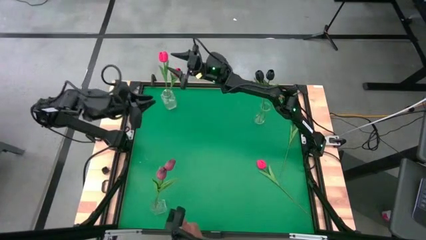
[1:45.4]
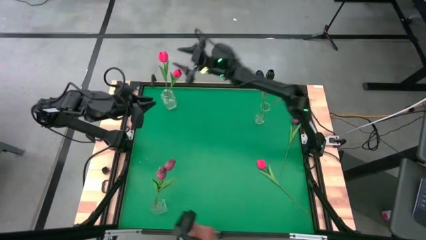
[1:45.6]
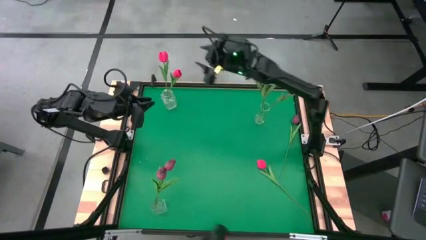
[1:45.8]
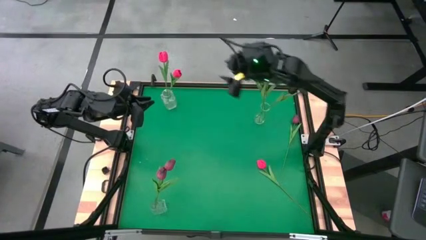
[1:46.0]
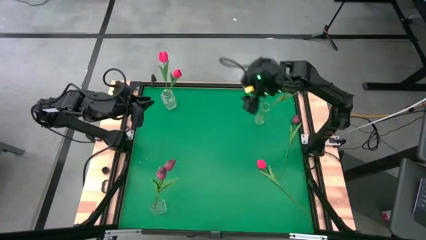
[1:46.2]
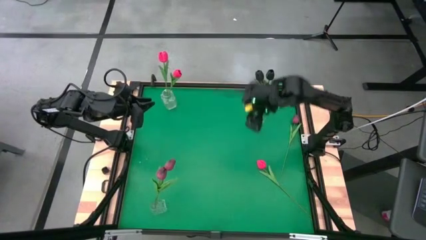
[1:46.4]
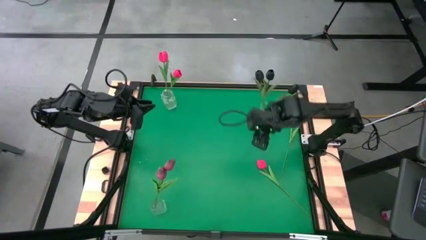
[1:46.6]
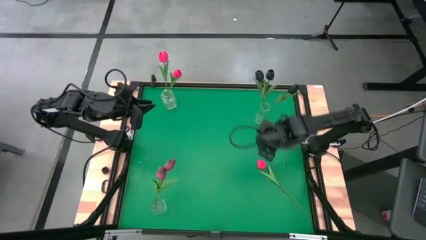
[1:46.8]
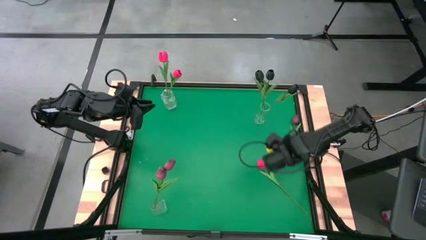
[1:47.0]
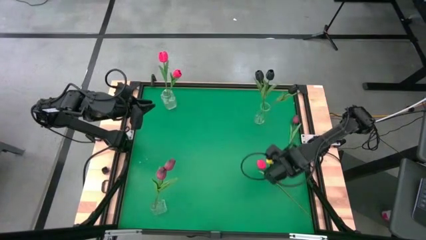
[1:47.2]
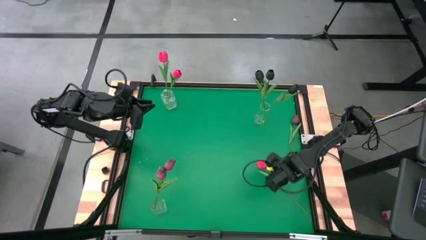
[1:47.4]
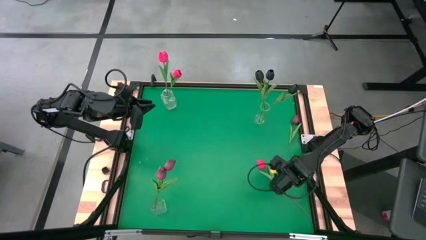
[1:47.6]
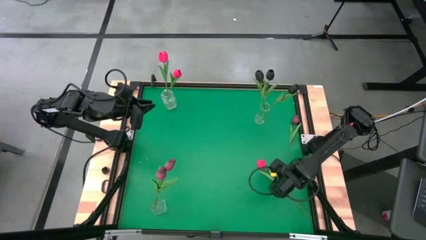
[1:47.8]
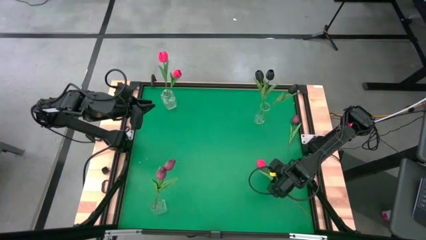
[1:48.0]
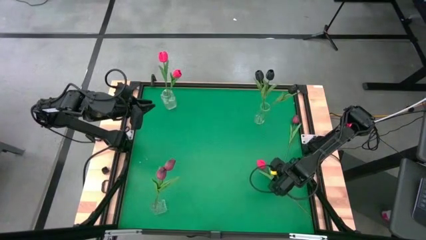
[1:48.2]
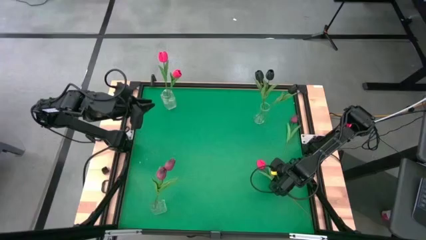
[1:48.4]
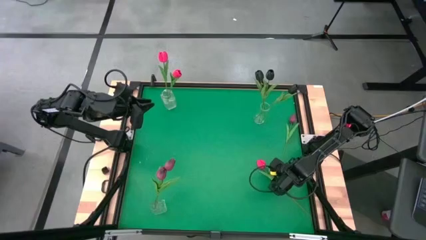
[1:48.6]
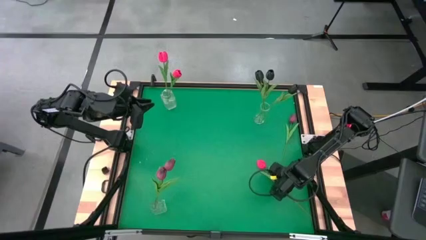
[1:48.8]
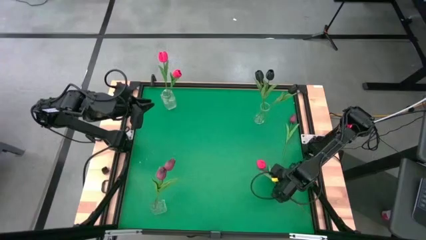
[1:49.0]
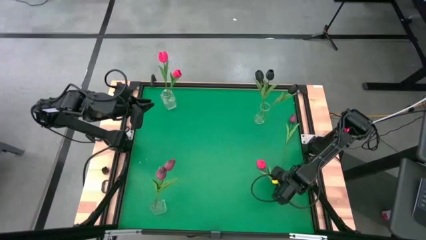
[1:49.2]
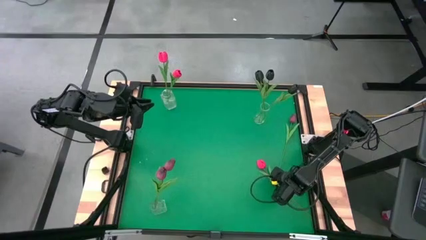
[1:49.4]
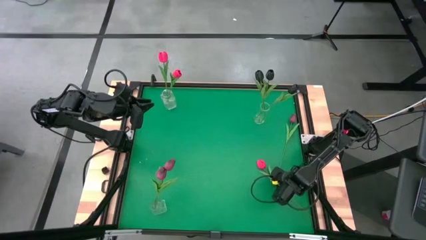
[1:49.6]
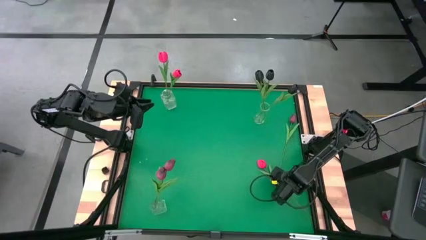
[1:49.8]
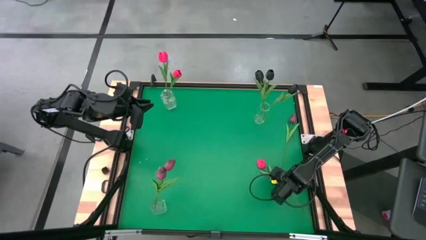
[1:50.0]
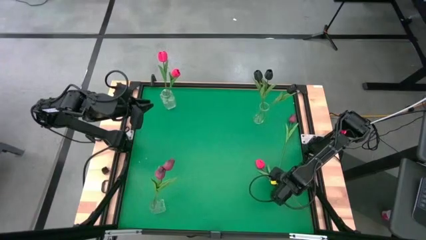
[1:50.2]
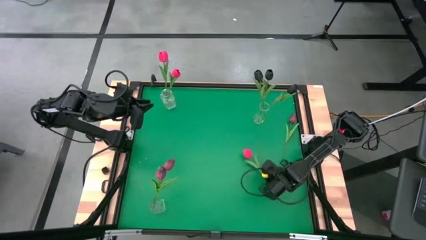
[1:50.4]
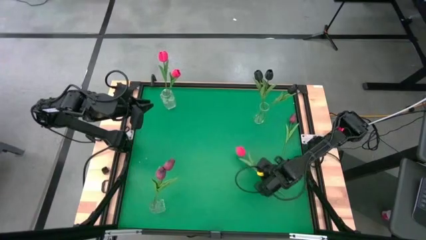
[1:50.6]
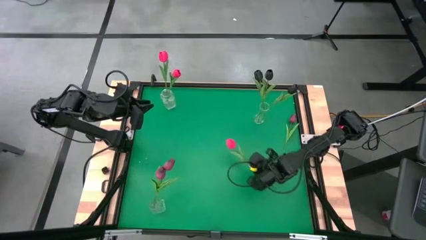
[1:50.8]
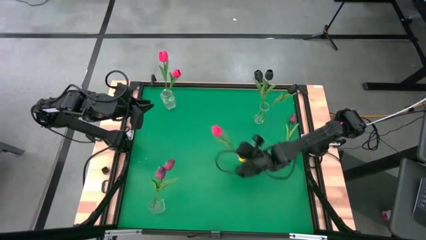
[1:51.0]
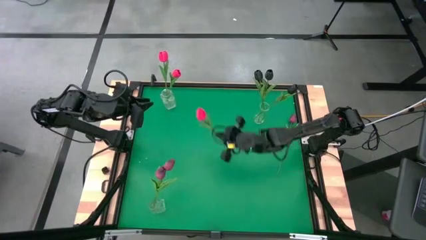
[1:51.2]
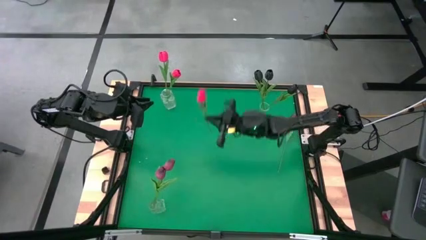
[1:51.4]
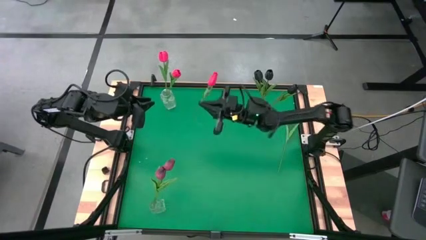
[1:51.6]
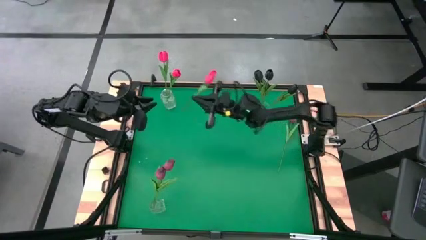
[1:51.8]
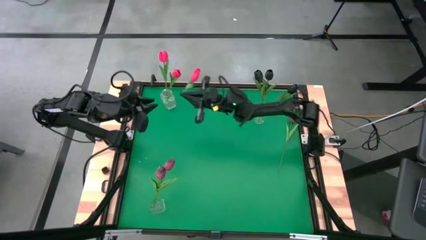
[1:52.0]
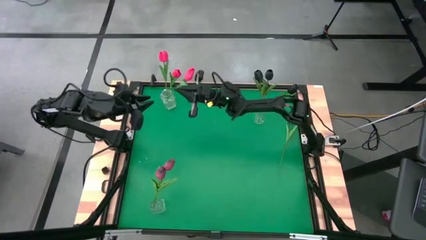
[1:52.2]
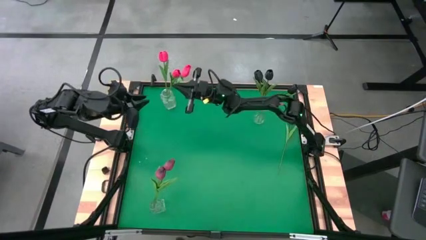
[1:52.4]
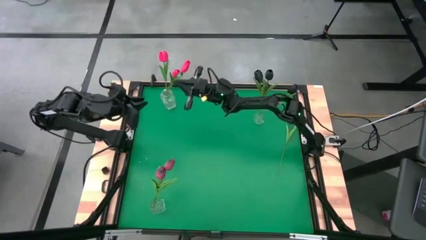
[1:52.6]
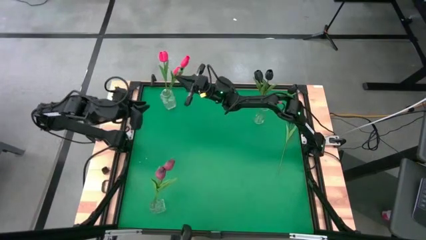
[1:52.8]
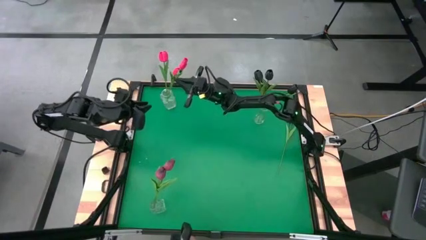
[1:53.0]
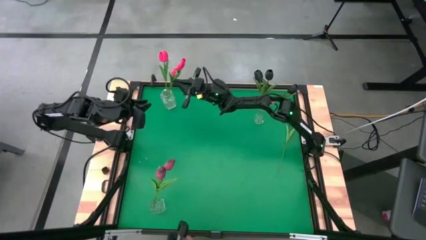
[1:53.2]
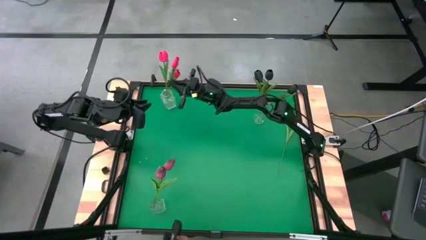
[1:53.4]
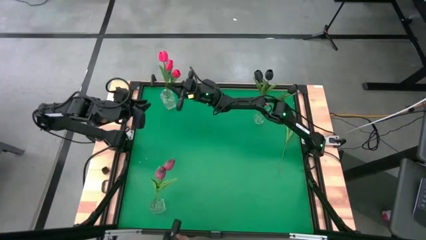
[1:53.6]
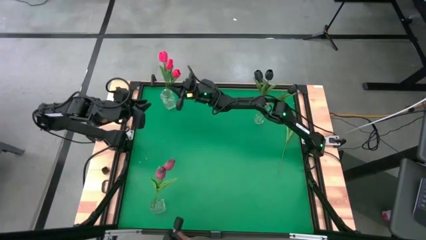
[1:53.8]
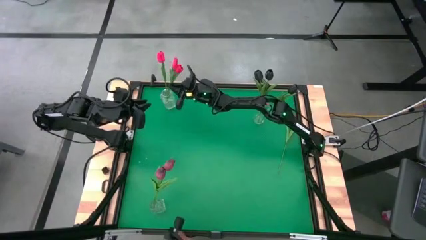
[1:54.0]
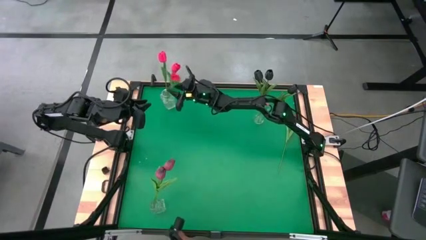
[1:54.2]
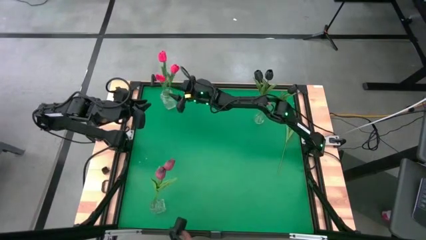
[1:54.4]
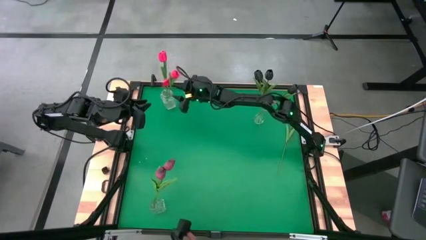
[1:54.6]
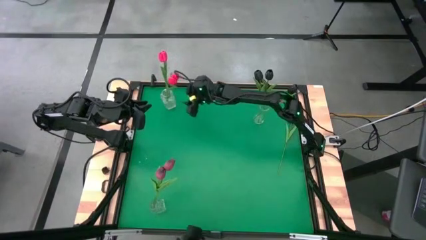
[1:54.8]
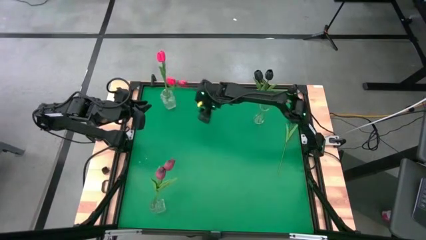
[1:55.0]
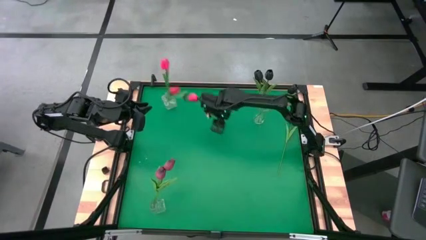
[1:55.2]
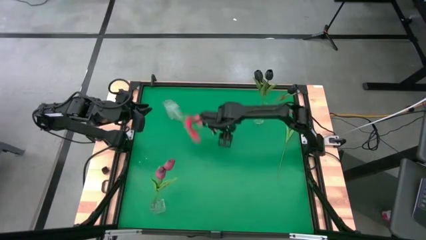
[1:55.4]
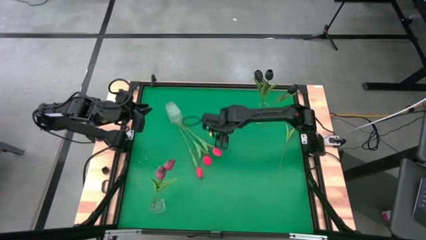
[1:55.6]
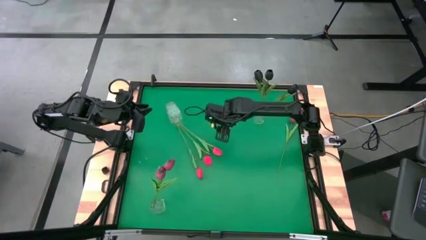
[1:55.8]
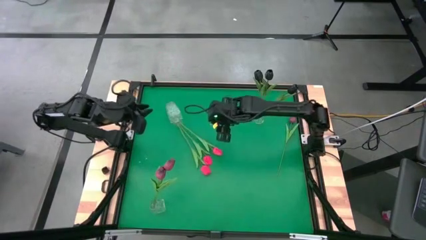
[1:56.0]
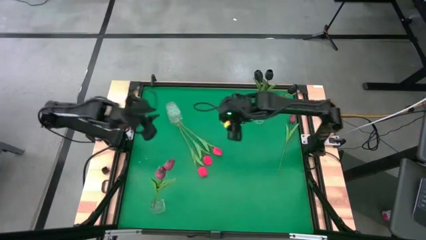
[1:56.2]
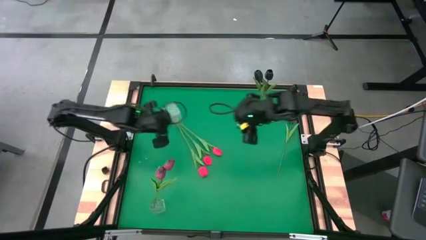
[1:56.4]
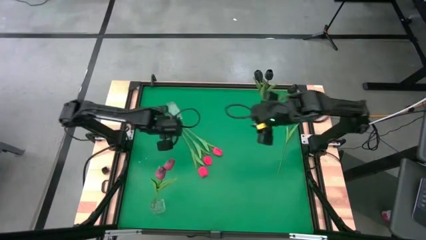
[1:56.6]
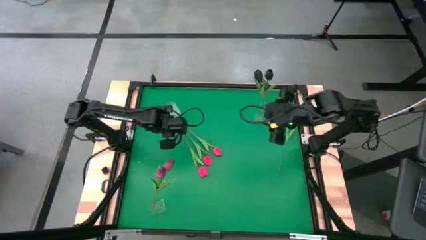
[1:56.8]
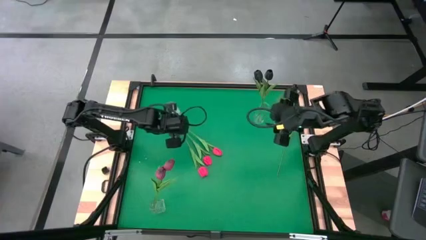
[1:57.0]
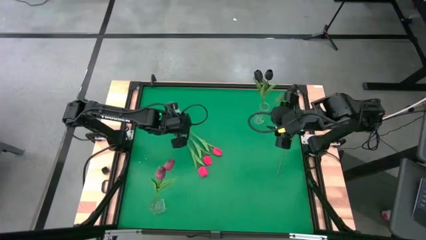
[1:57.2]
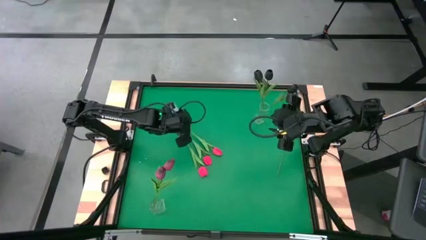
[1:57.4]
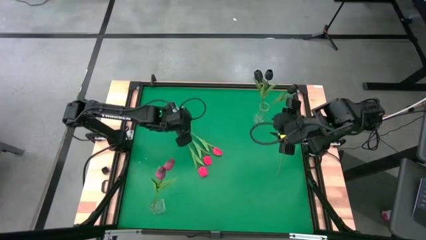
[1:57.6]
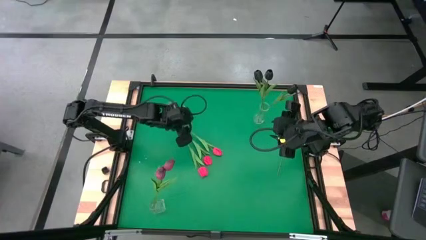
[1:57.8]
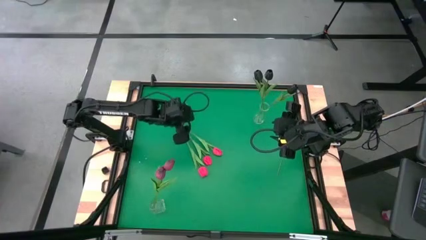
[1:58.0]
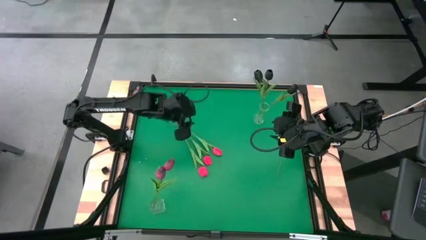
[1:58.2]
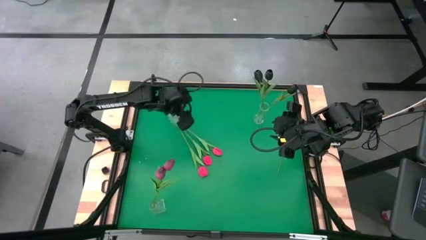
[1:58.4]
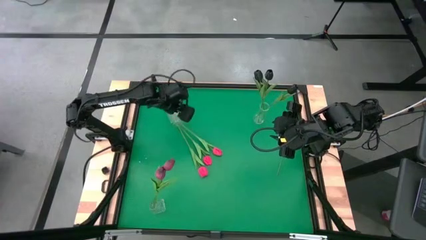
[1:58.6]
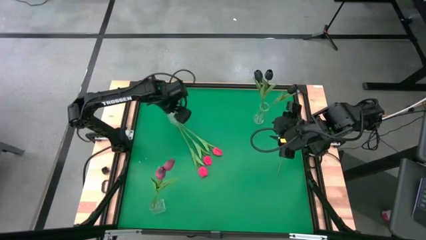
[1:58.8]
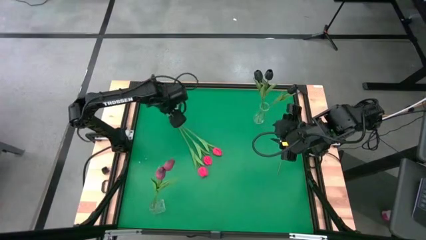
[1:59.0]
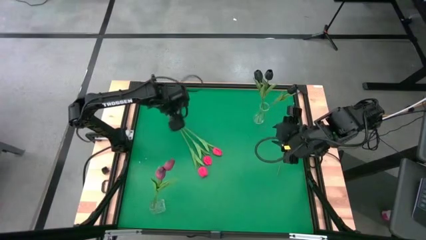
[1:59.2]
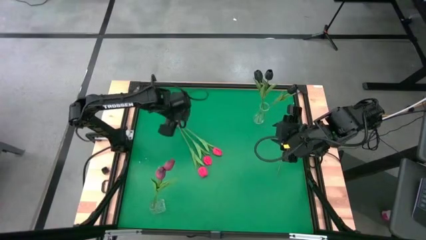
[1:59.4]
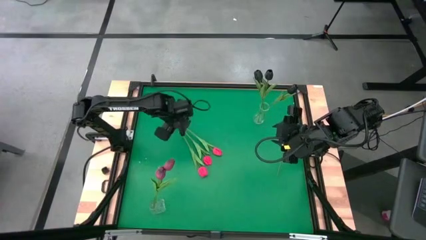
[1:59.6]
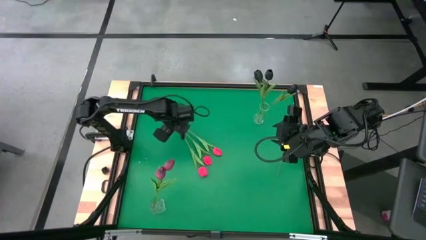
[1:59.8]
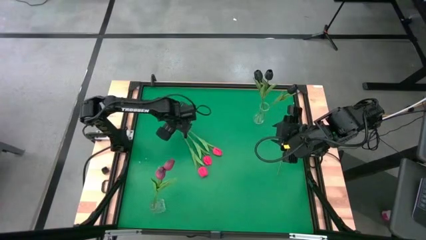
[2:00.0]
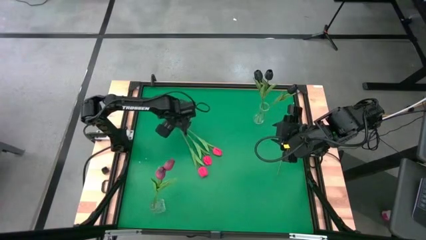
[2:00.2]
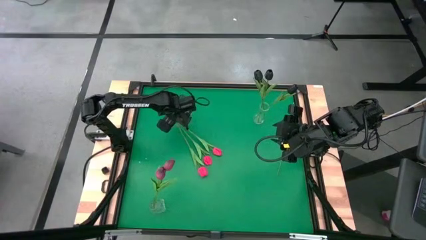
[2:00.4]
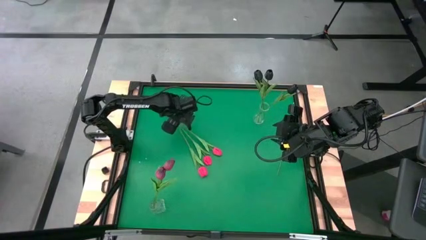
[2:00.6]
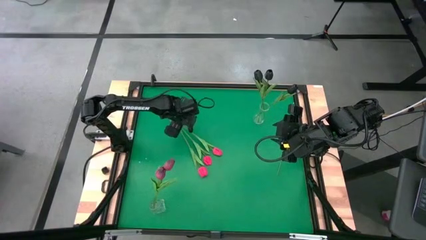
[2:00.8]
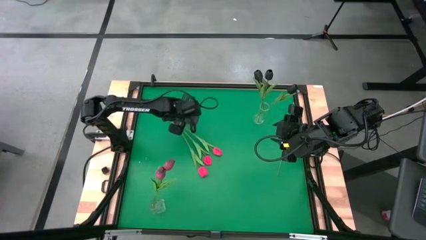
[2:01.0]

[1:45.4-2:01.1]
Task: Sort flowers into vase by color
Put the pink flower into the top left transparent vase
